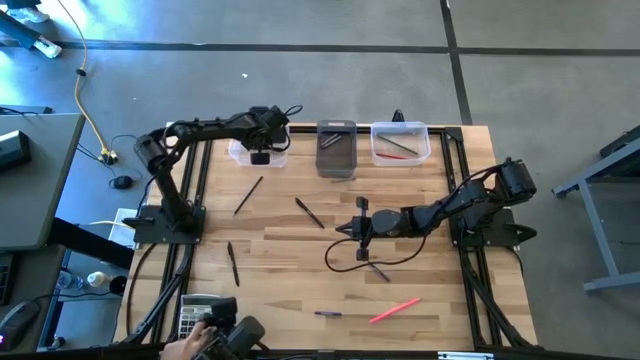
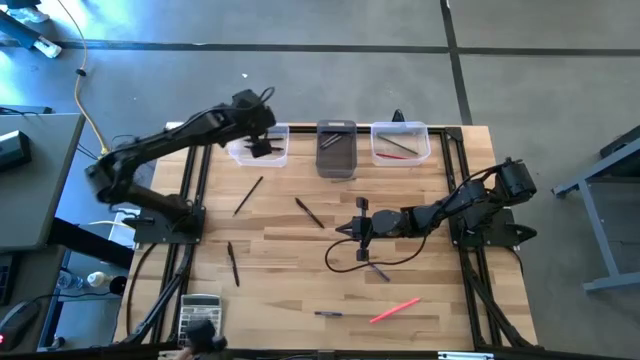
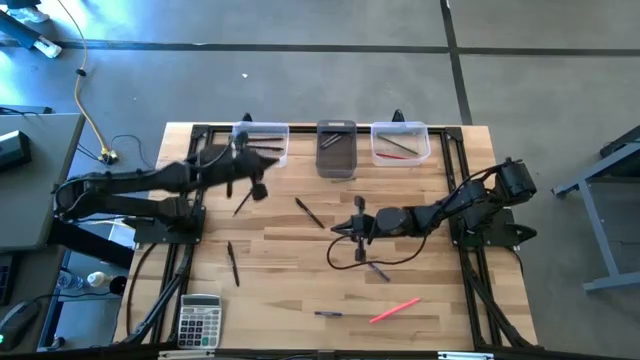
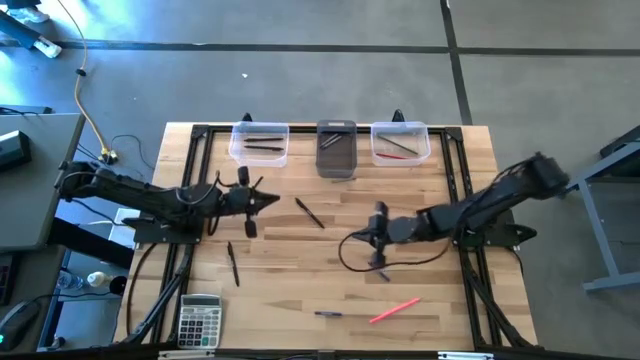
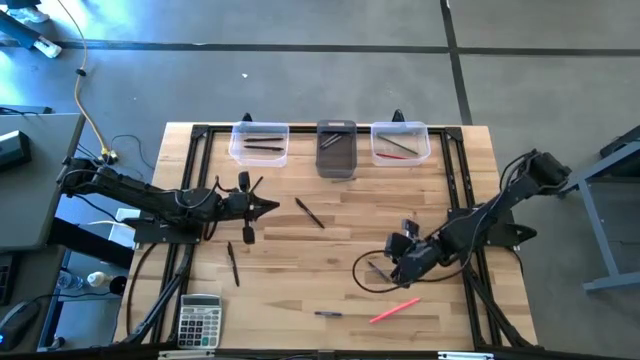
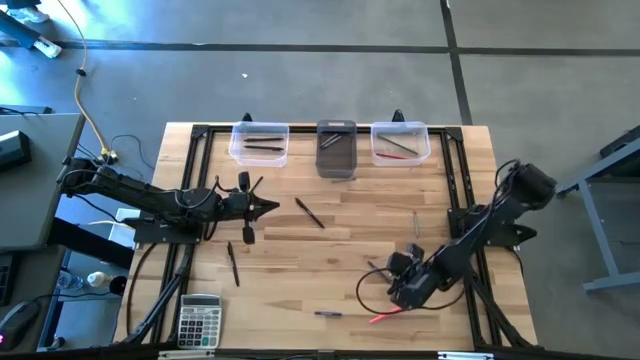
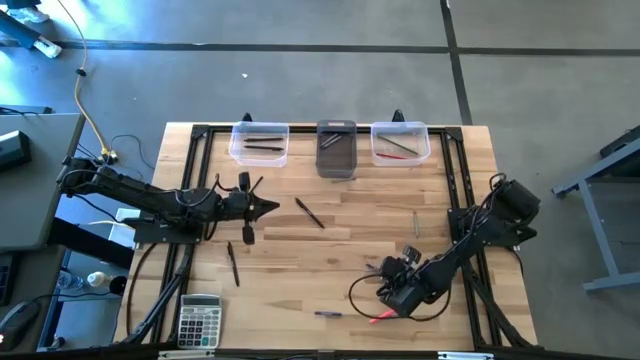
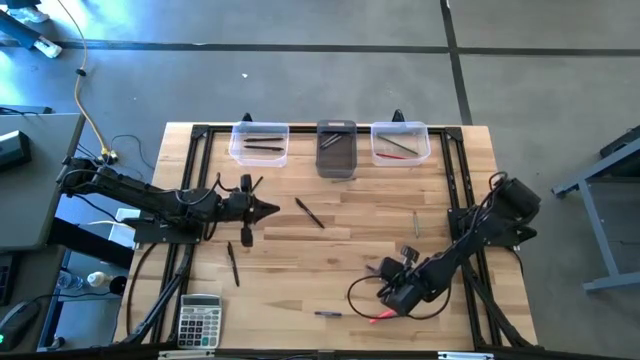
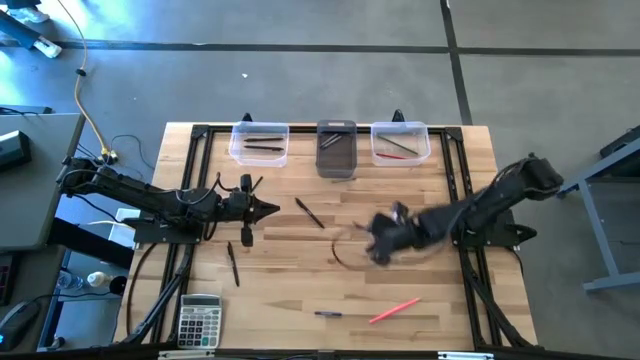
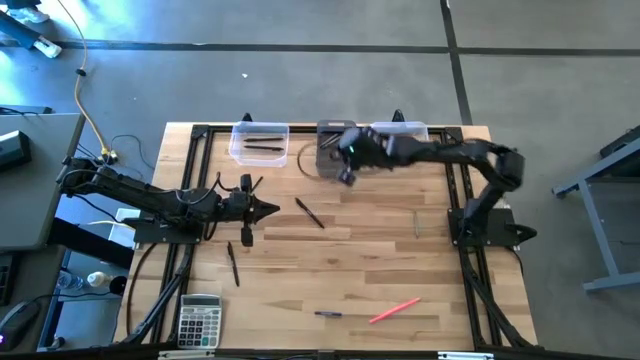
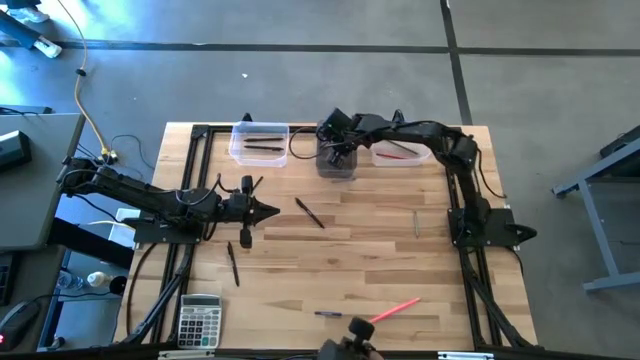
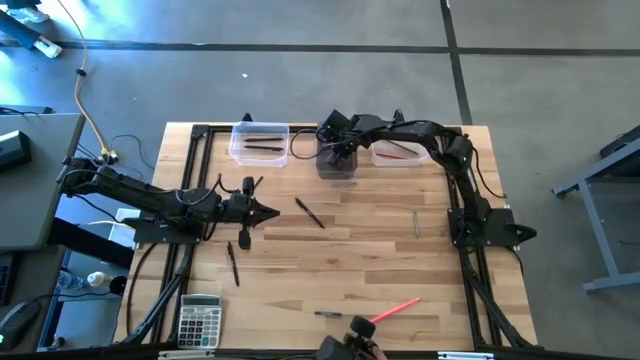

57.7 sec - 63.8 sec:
Task: Sort crayons/erasers/pens/pencils in bins
Put the blue crayon into the black bin

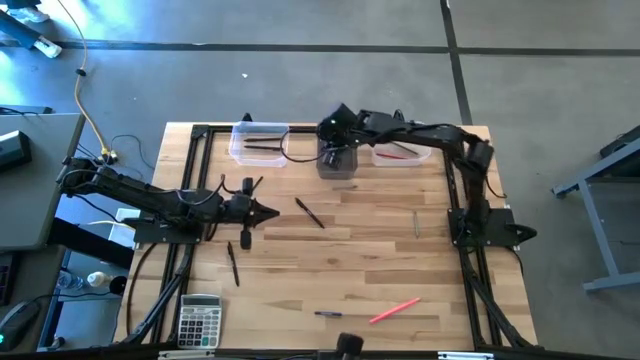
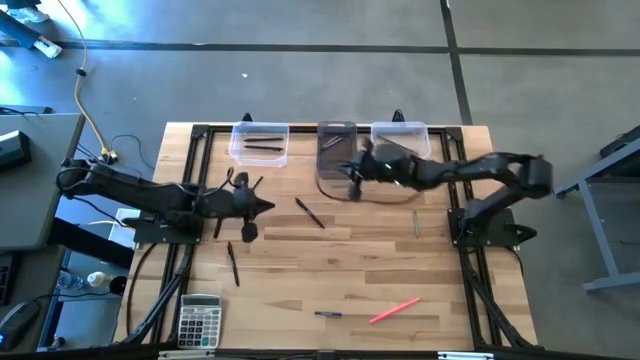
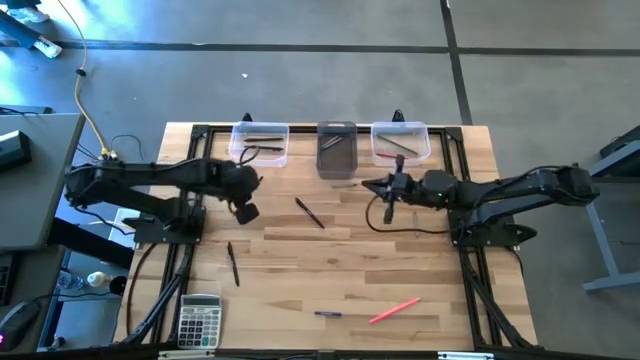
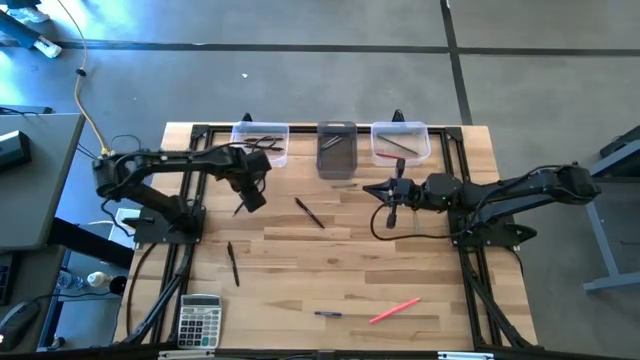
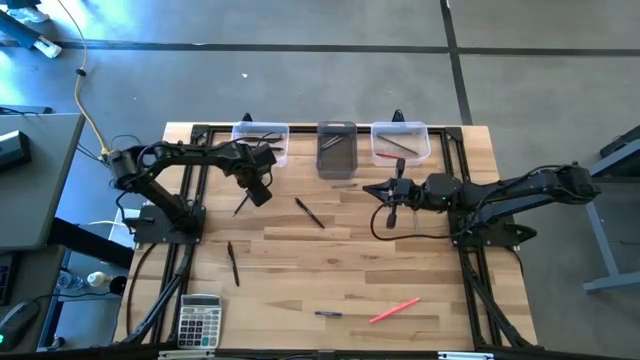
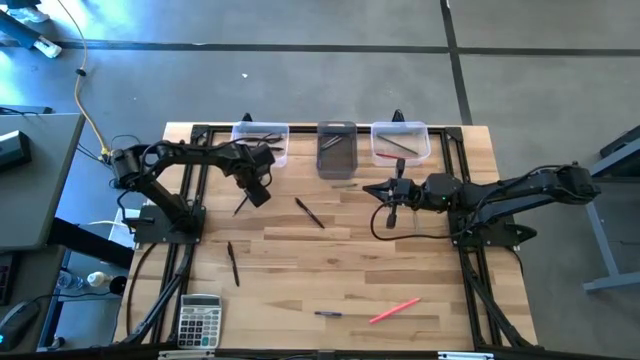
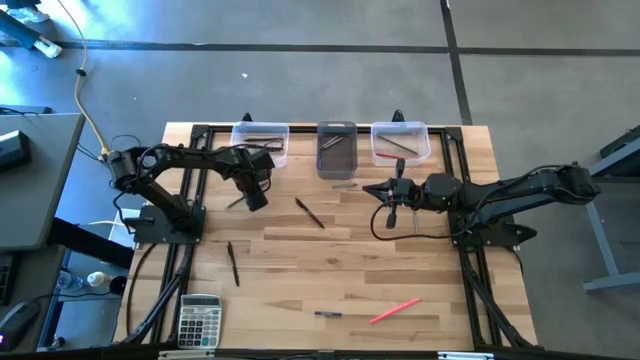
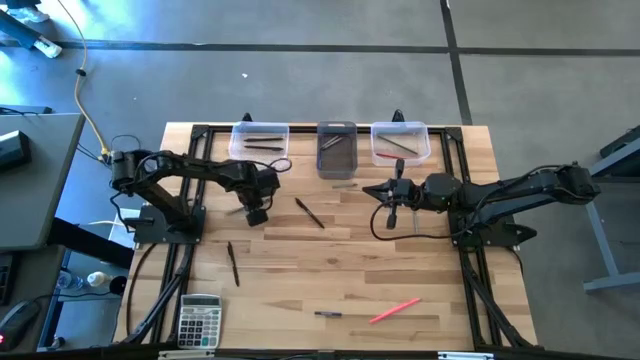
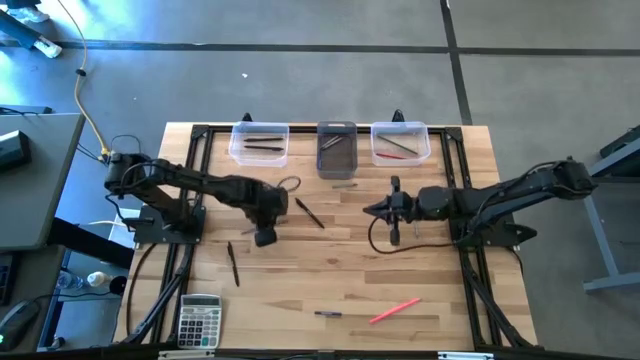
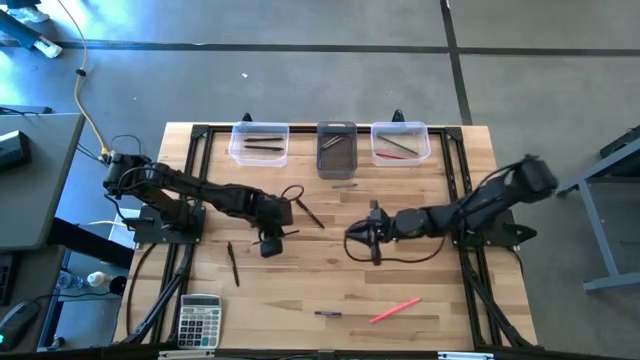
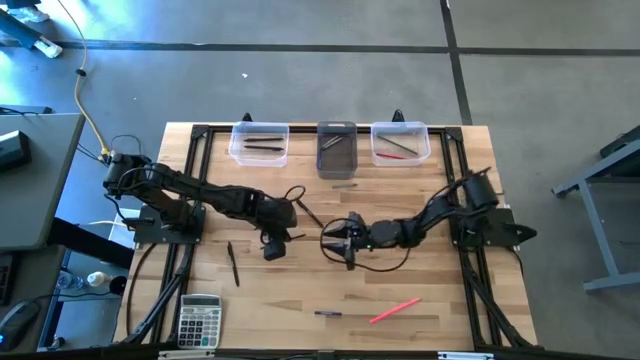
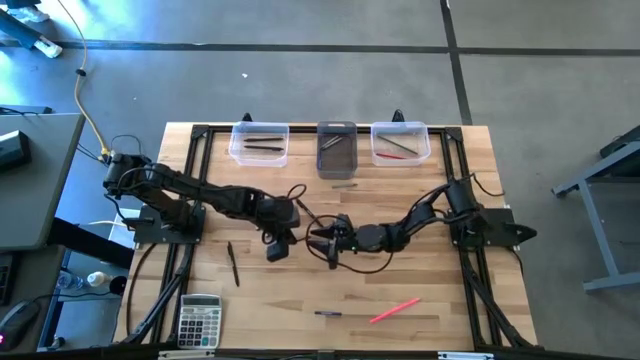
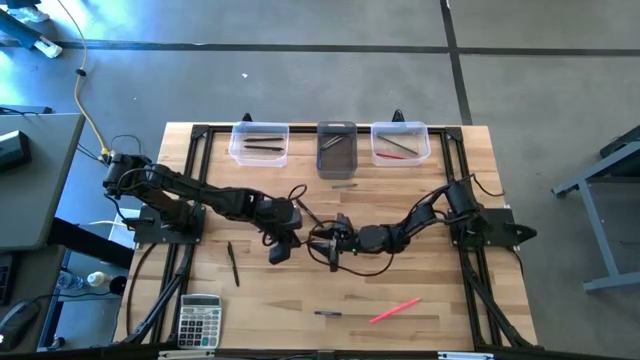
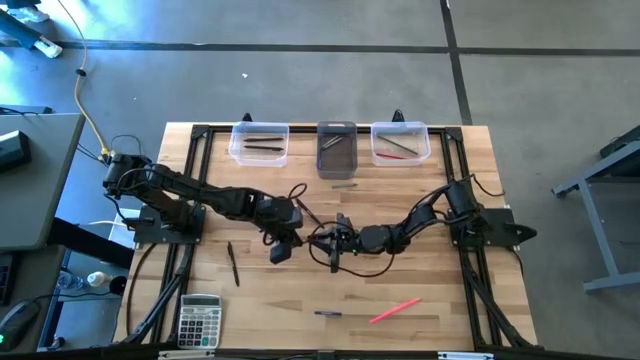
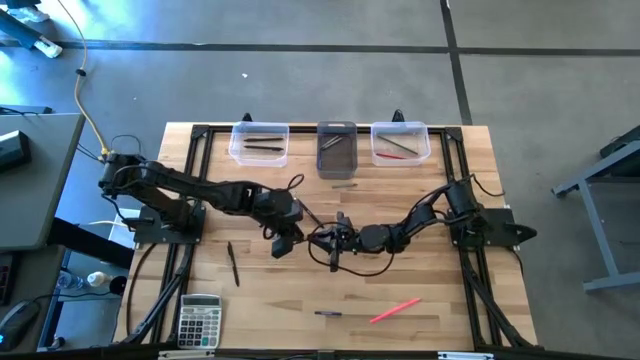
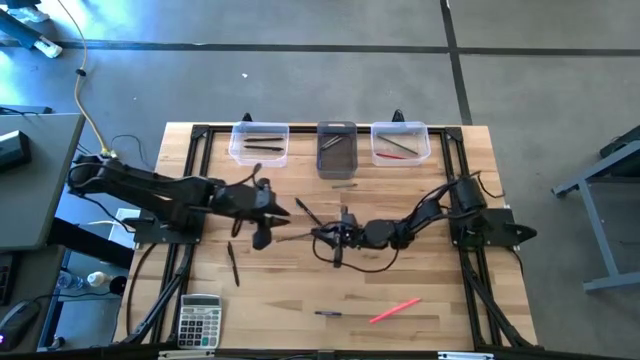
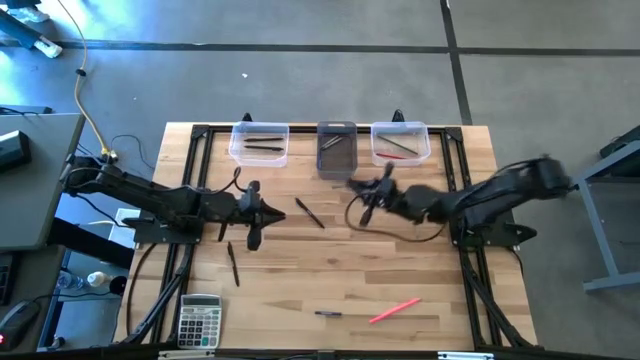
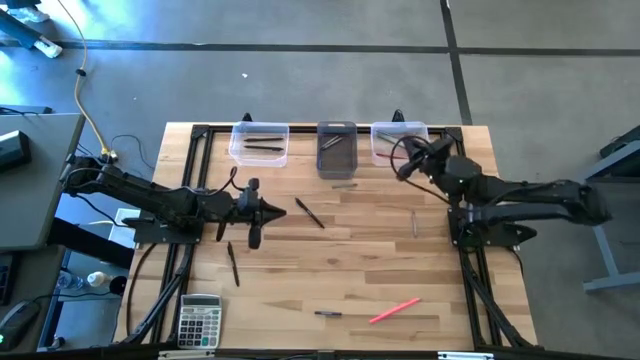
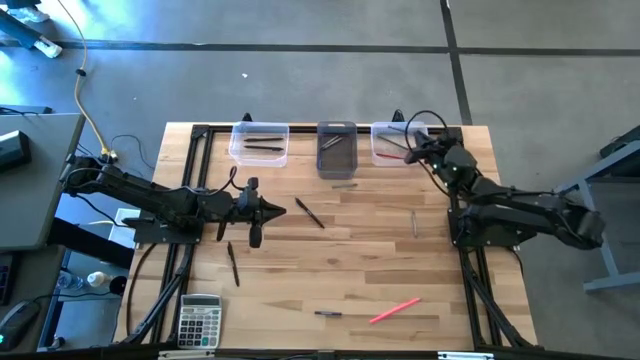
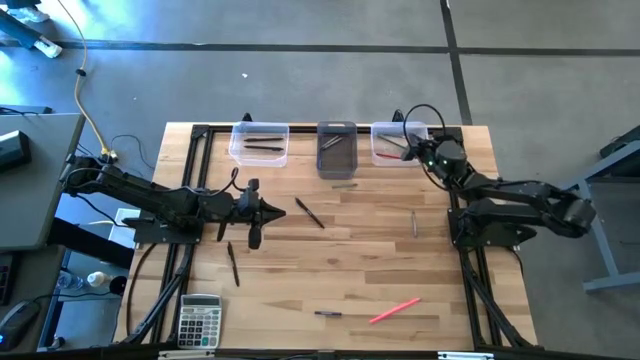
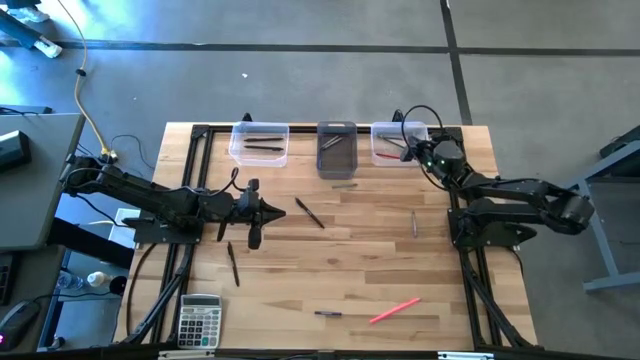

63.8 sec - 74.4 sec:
Put the blue pencil into the right transparent bin

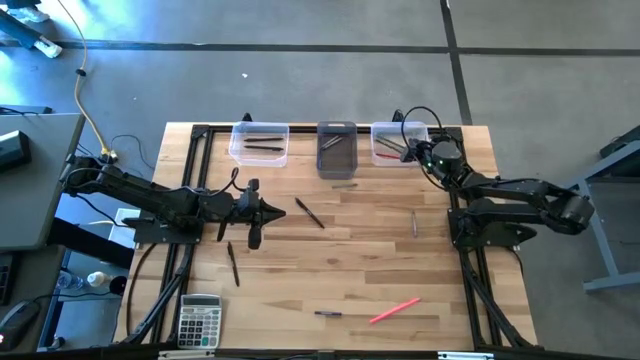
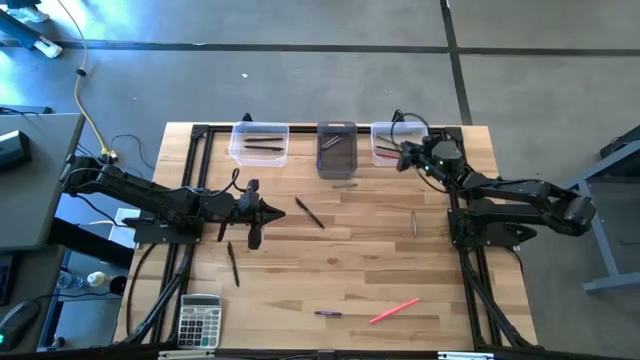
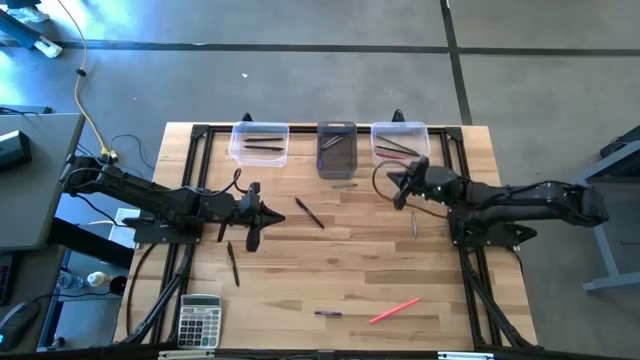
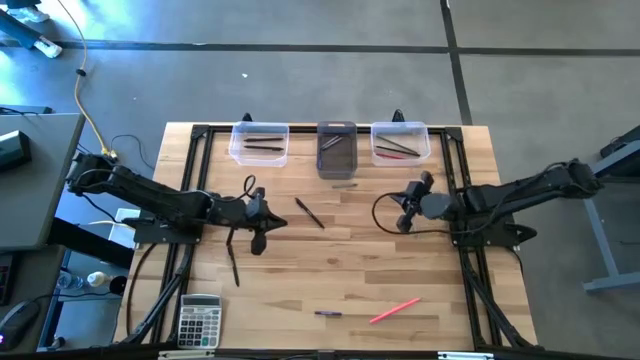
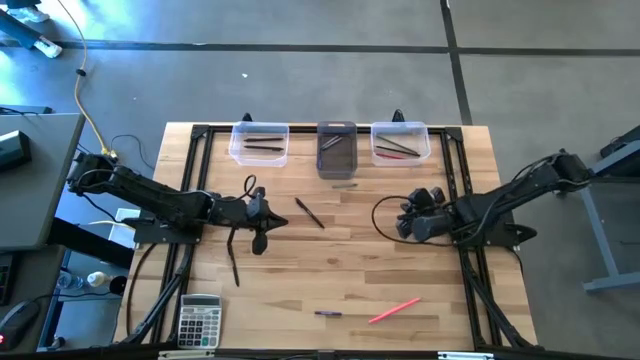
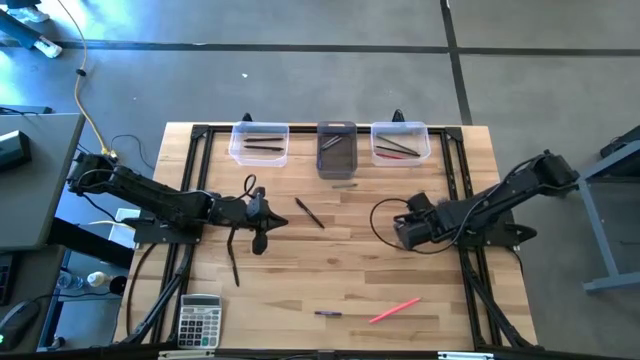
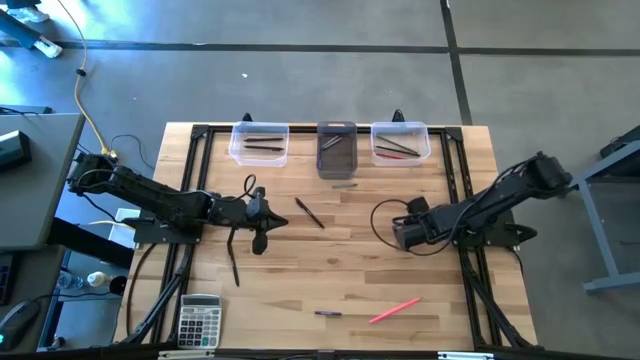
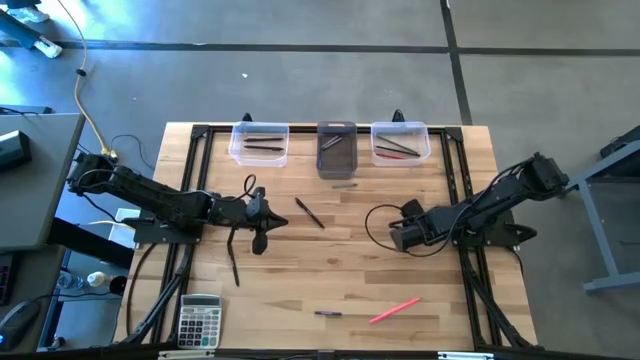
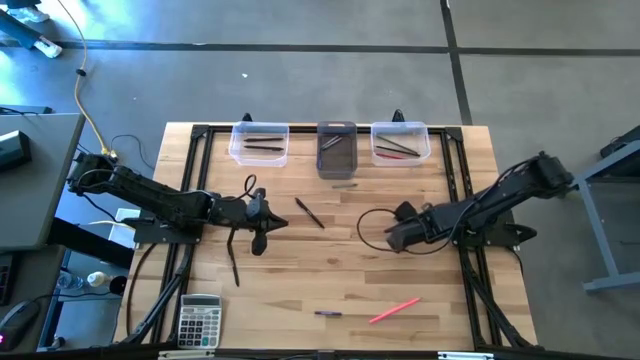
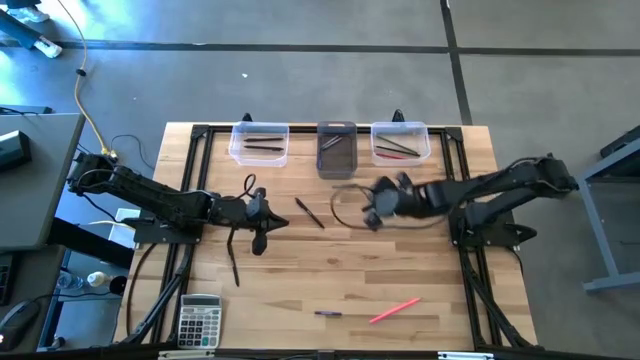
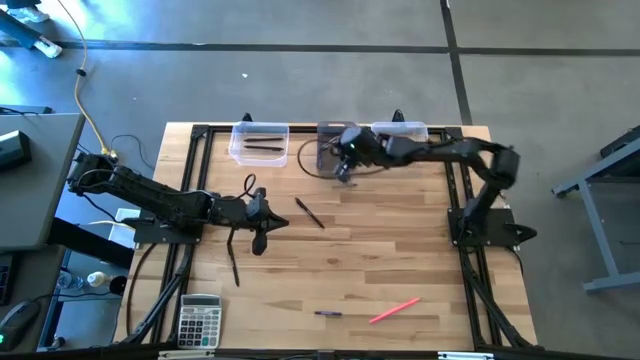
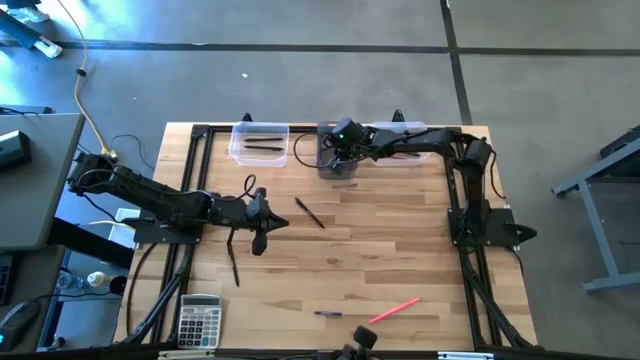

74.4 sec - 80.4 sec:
Put the gray crayon into the black bin
